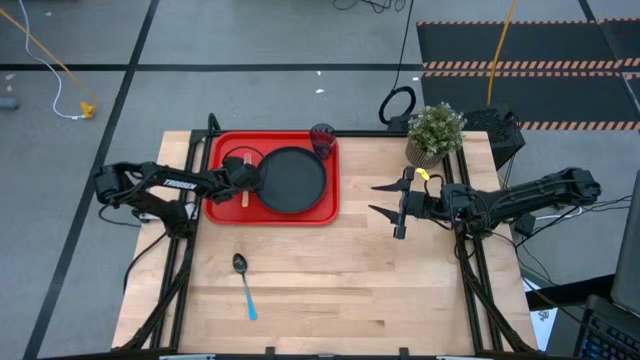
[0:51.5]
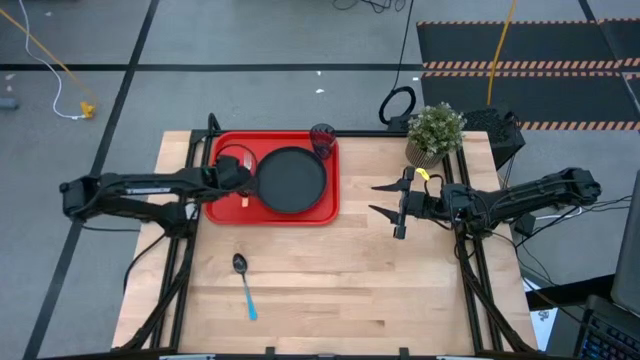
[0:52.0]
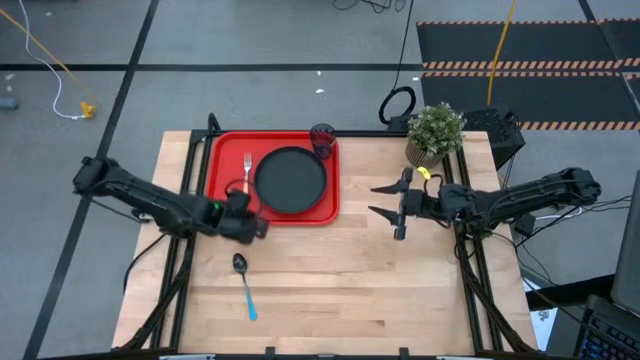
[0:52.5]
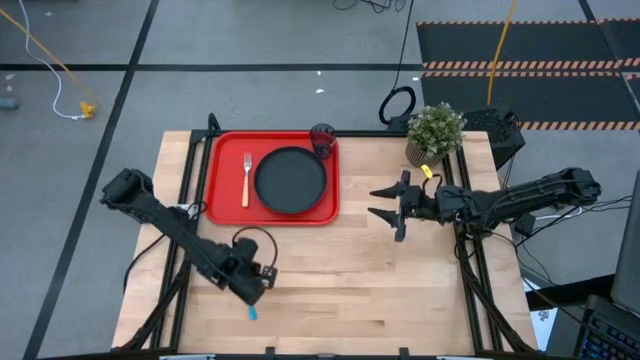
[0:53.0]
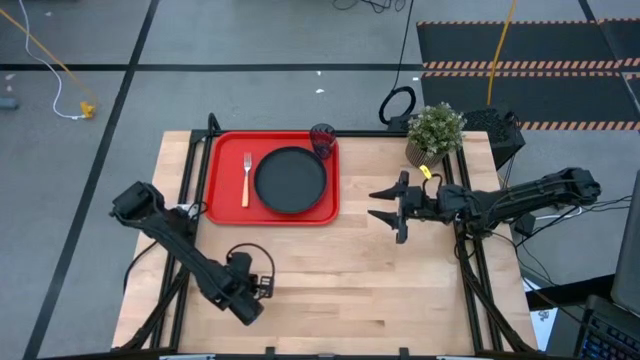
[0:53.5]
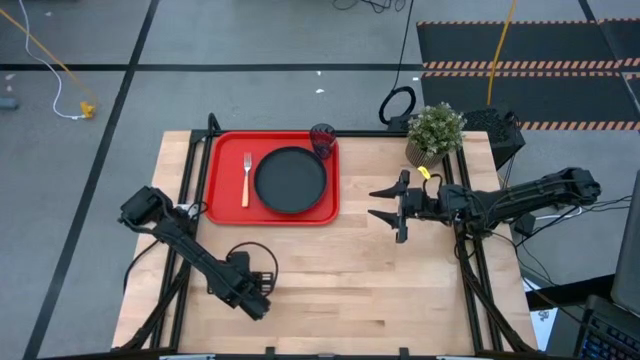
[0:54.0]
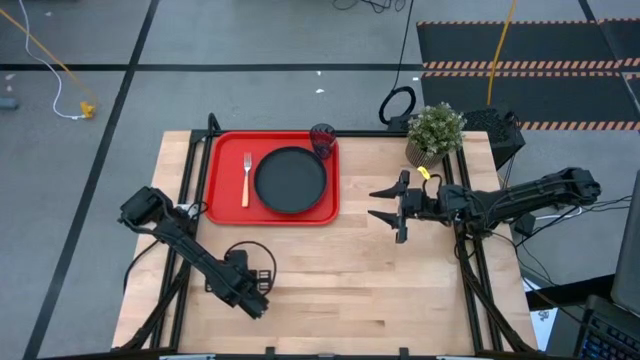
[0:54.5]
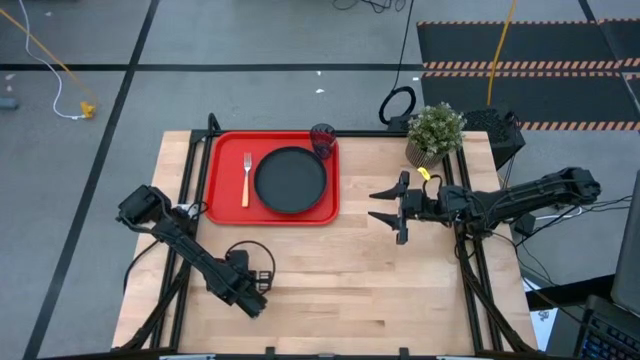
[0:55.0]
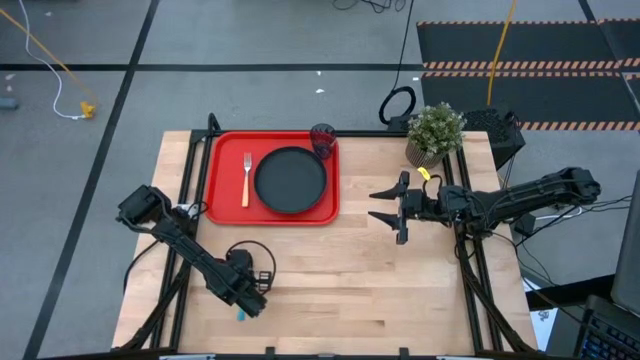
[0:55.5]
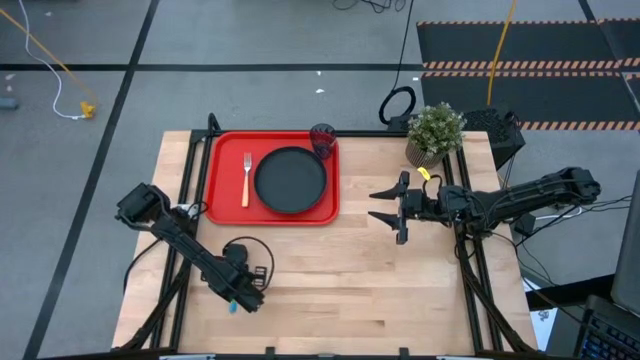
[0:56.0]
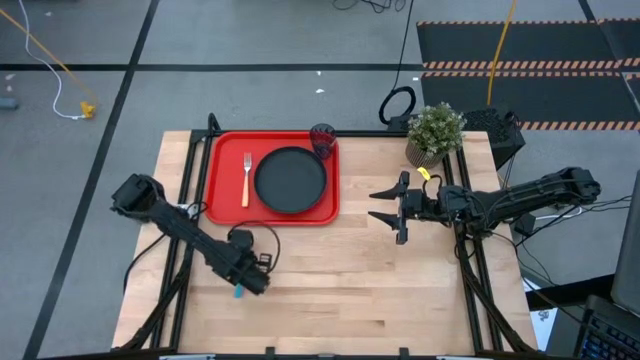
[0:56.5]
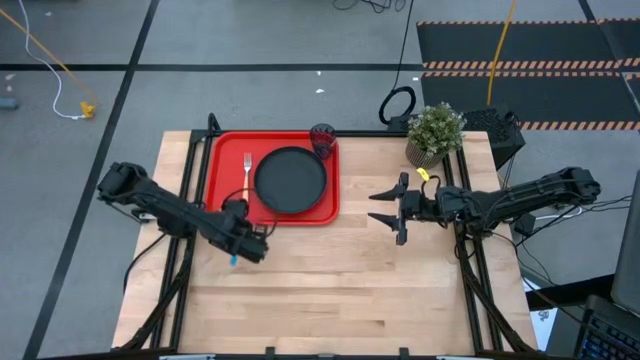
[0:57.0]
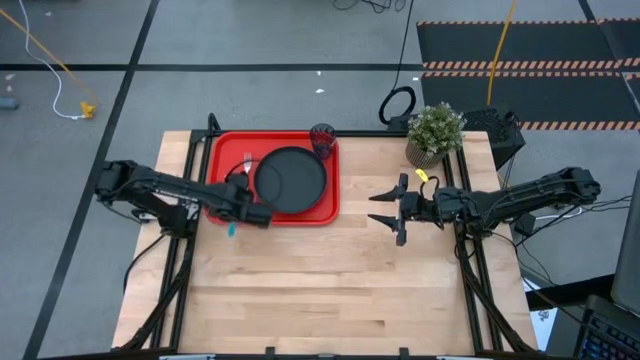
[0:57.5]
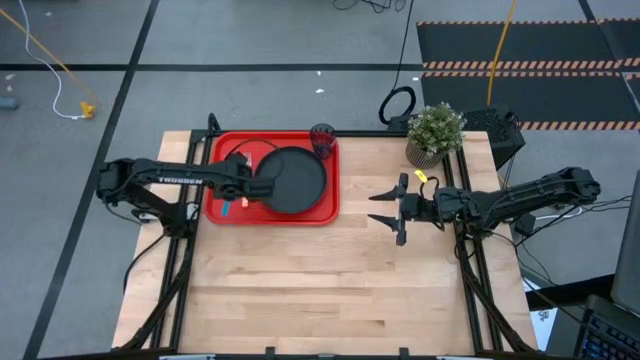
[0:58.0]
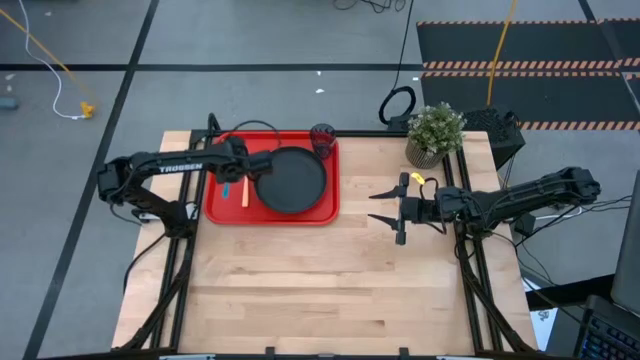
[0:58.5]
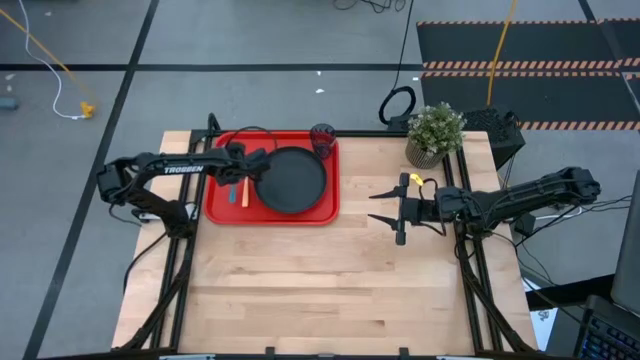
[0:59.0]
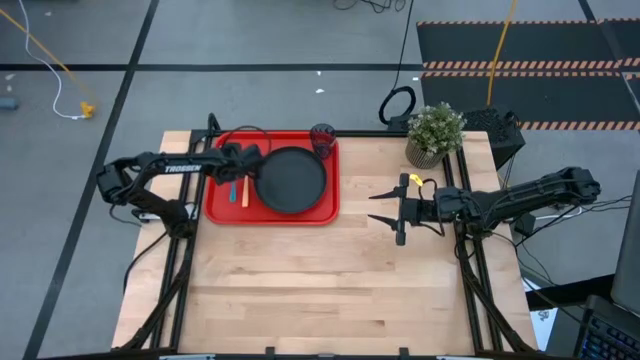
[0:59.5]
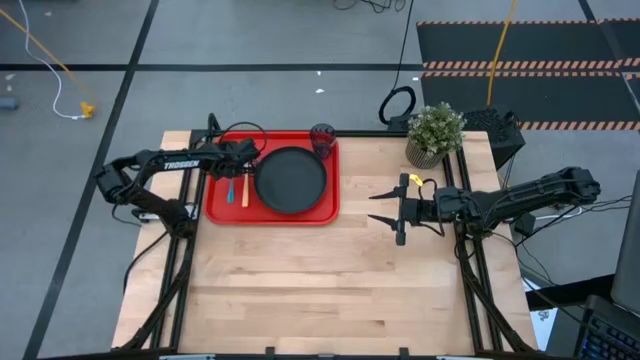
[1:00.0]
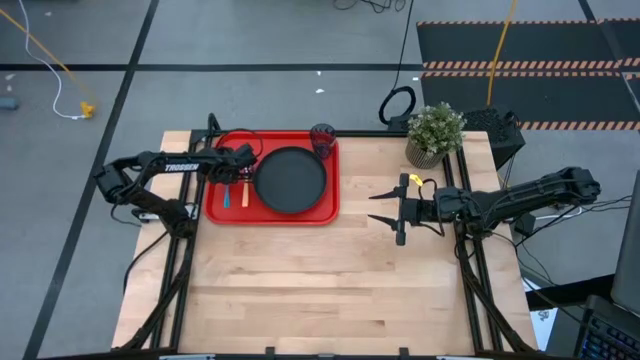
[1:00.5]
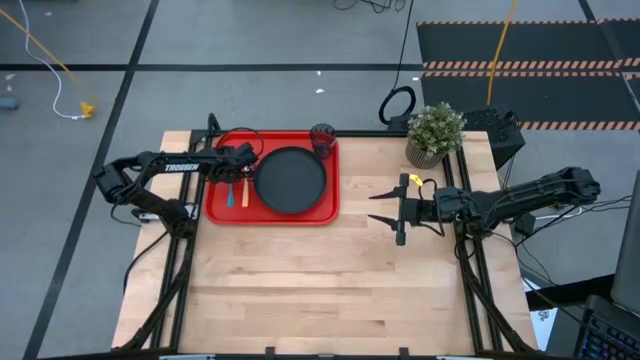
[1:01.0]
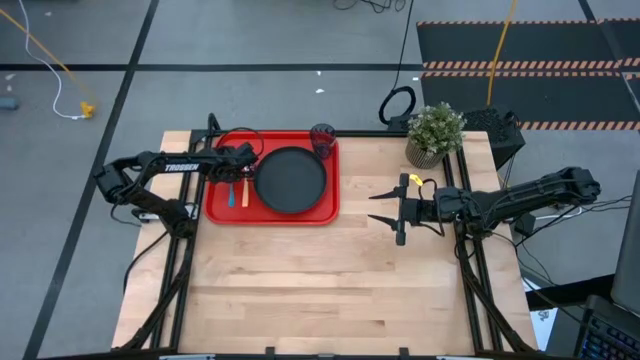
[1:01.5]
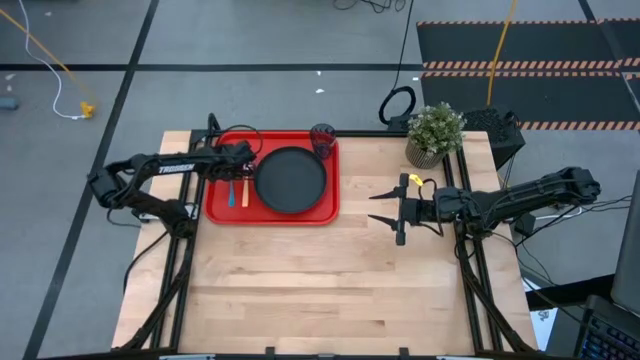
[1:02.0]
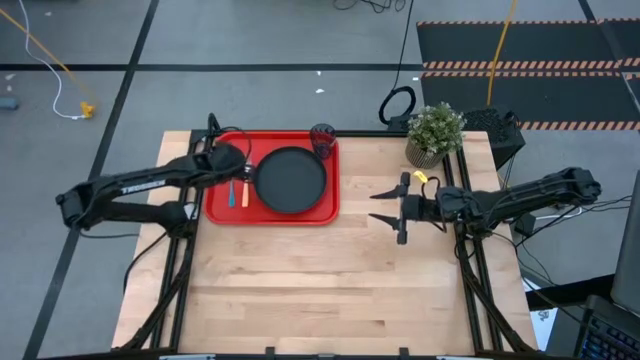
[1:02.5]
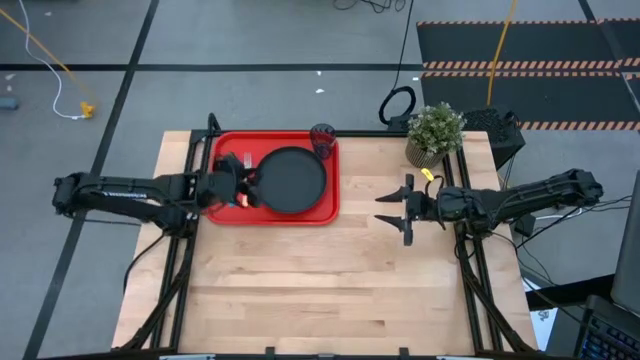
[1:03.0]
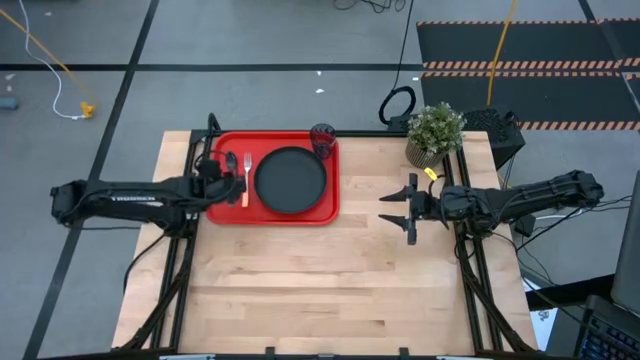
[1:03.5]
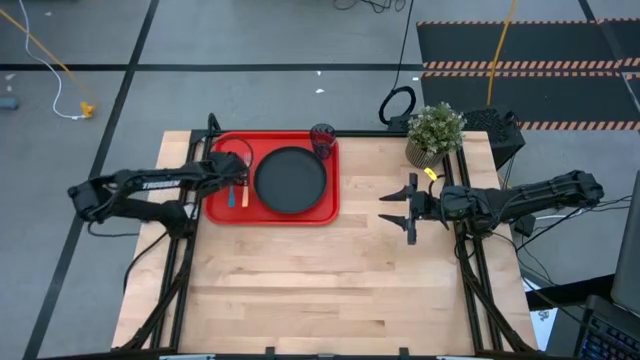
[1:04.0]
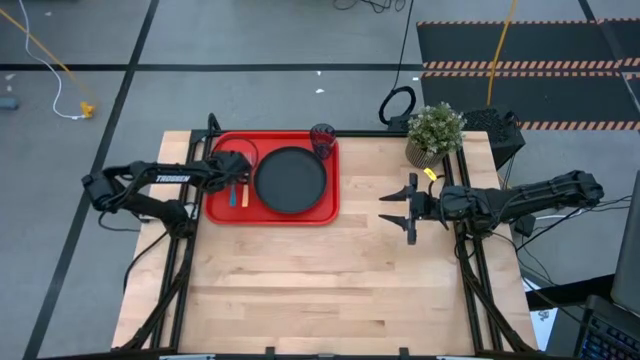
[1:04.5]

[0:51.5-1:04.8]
Task: Pick and place plate/cup/fork/spoon on tray
Put the blue spoon on the red tray to the left of the orange fork

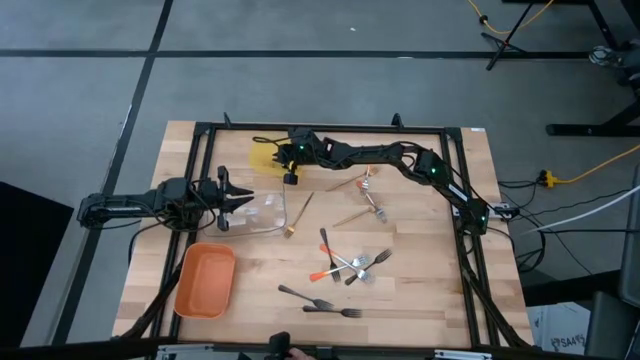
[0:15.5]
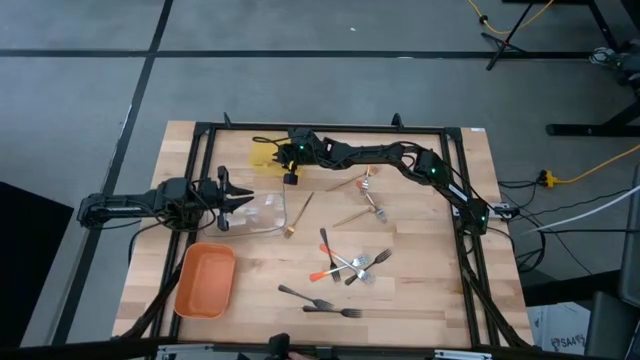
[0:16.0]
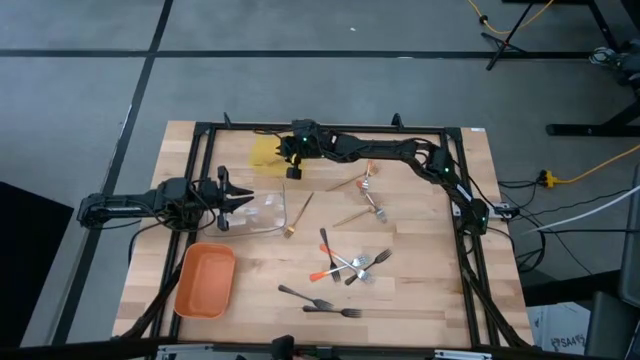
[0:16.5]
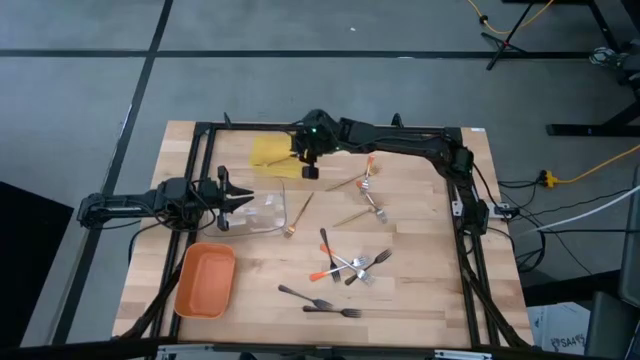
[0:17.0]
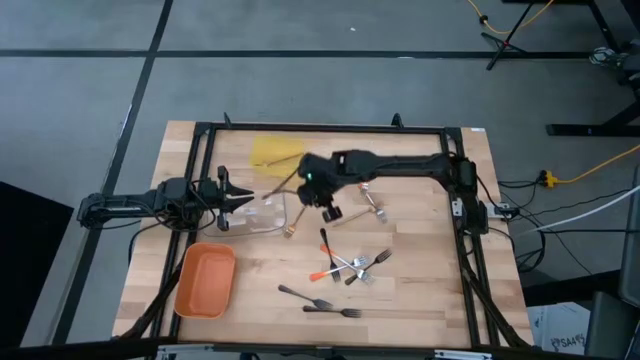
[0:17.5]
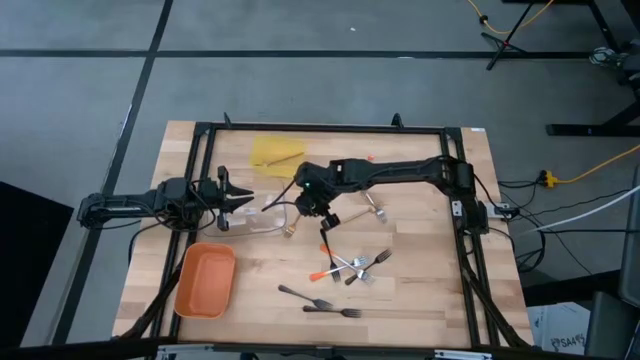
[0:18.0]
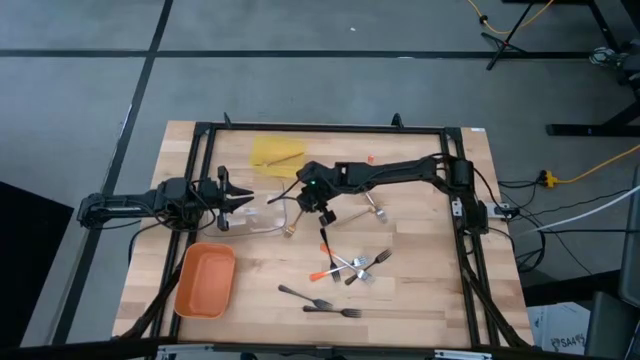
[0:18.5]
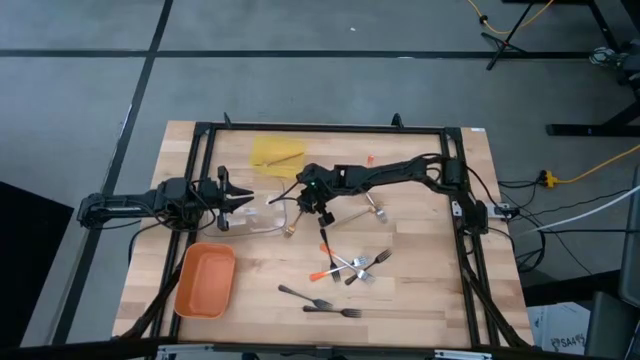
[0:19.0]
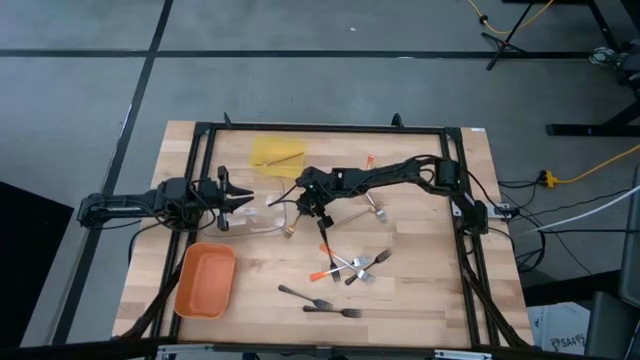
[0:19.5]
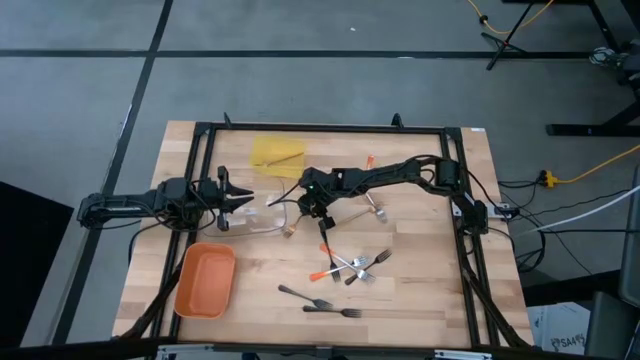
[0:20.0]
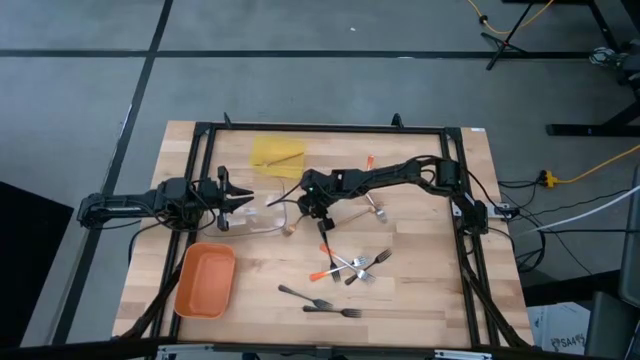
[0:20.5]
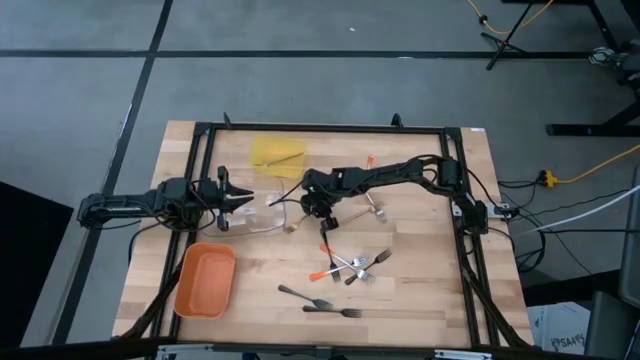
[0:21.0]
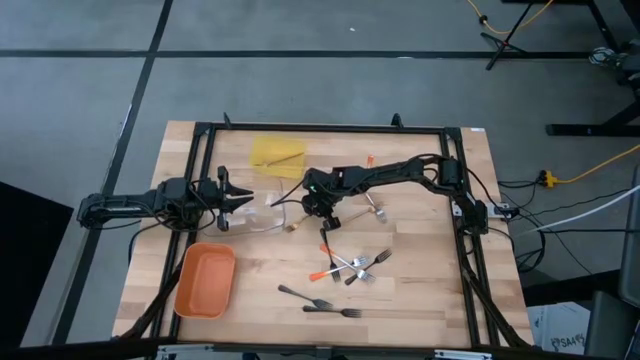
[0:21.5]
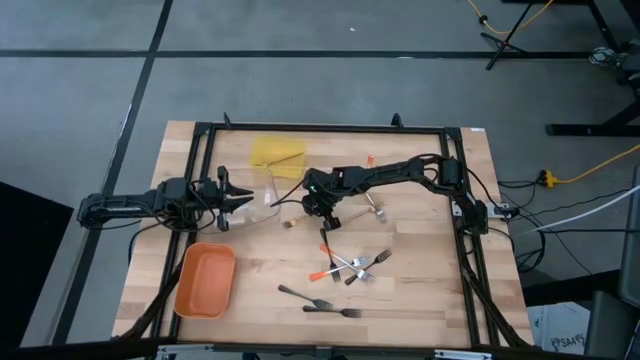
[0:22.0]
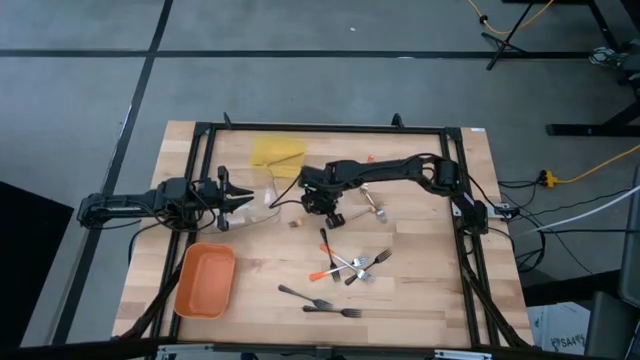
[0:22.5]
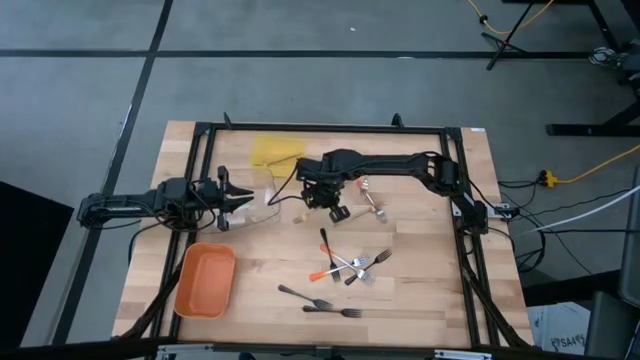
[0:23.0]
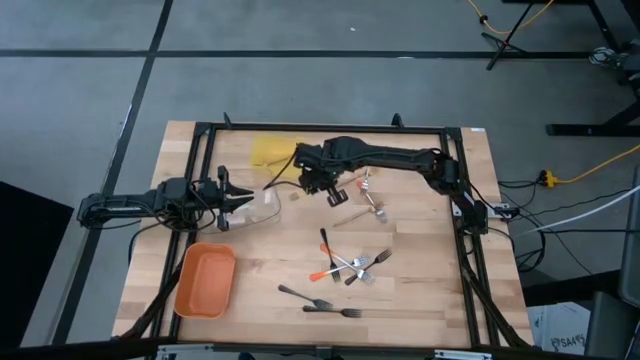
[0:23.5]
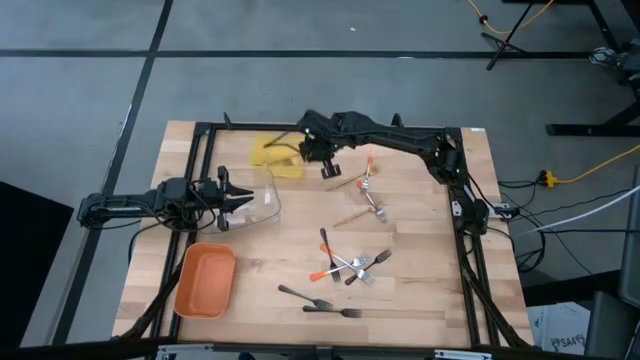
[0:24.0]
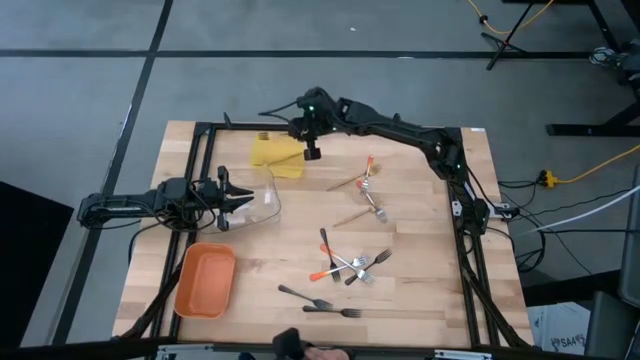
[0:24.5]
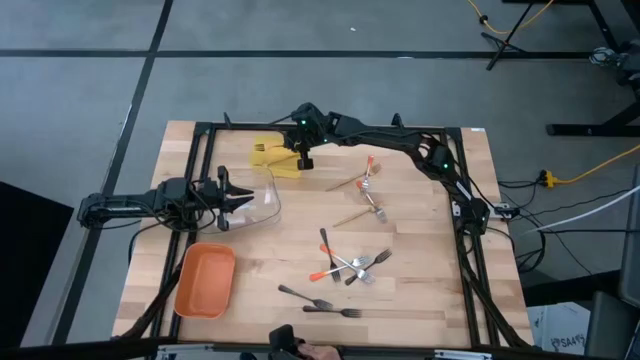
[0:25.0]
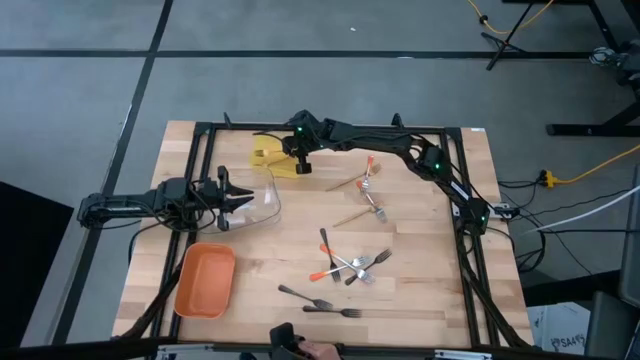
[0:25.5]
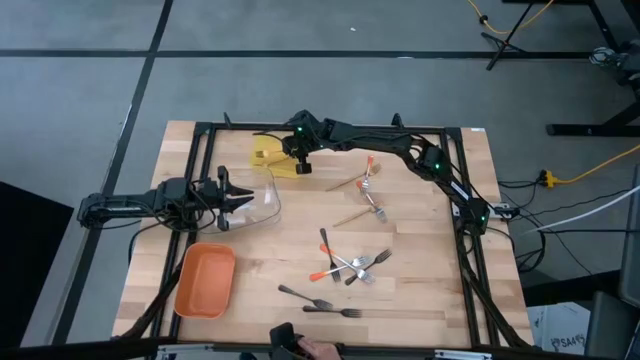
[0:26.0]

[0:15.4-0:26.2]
Task: Sort silverware by color (type)
Put the gold fork into the yellow bin
